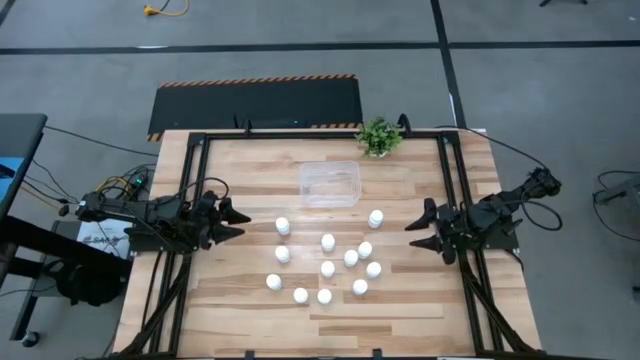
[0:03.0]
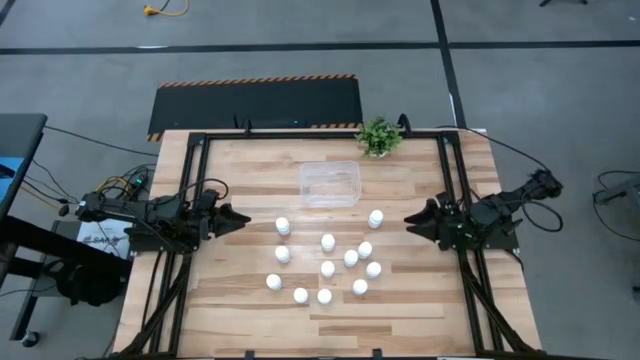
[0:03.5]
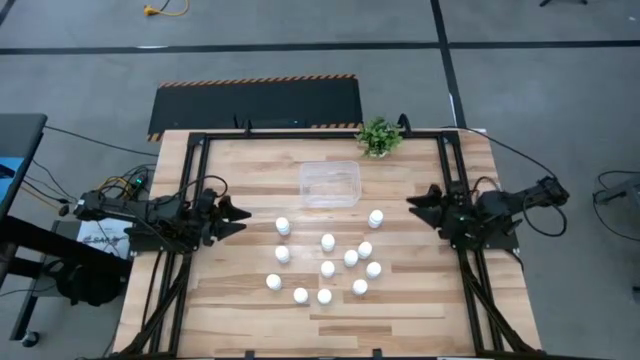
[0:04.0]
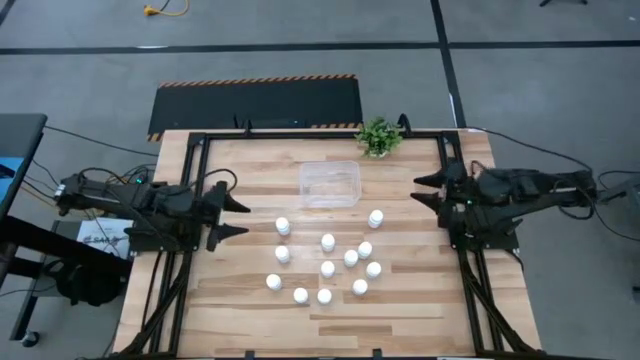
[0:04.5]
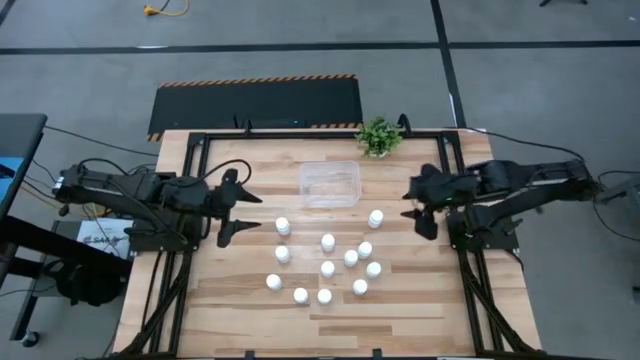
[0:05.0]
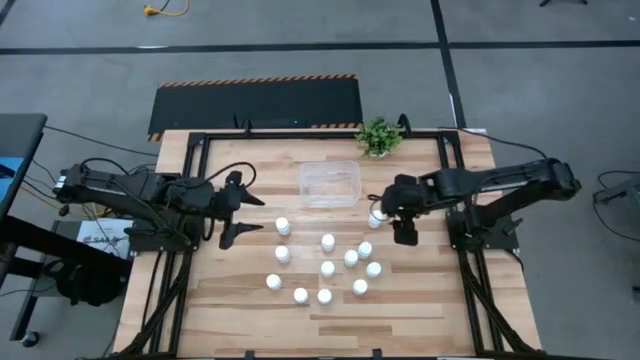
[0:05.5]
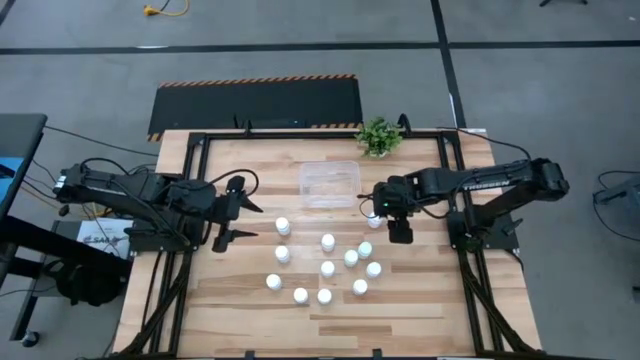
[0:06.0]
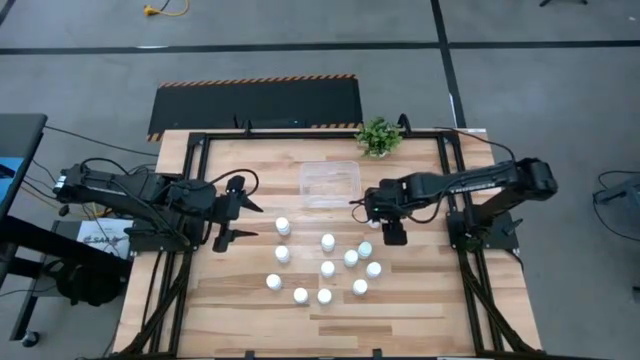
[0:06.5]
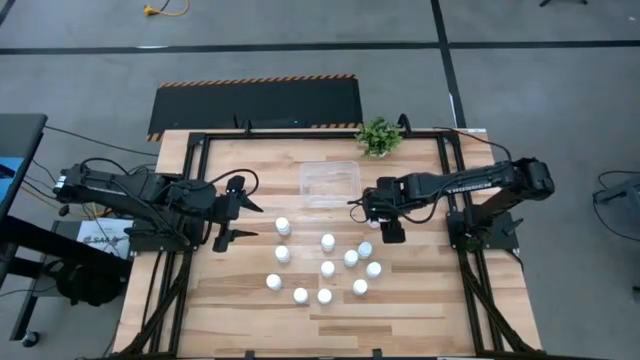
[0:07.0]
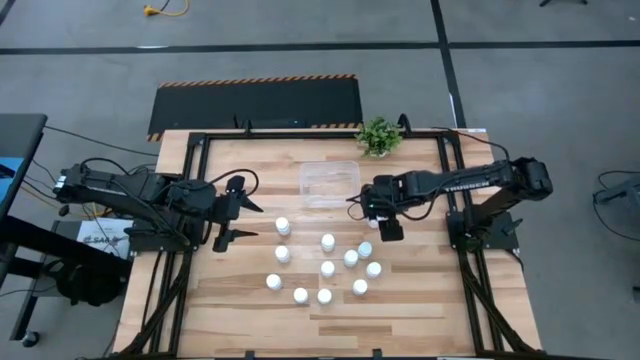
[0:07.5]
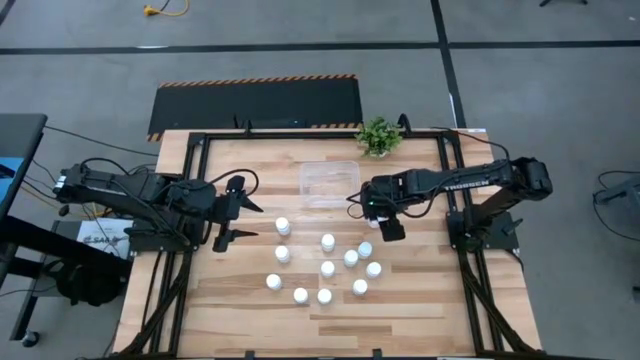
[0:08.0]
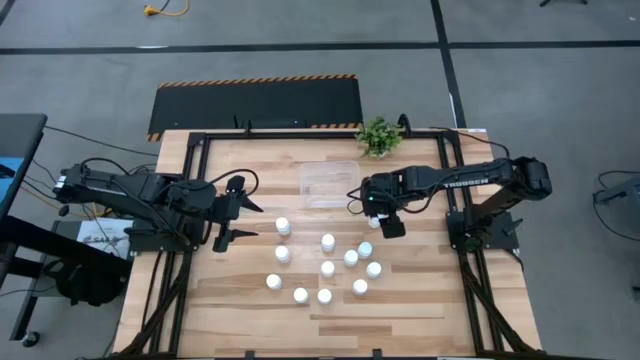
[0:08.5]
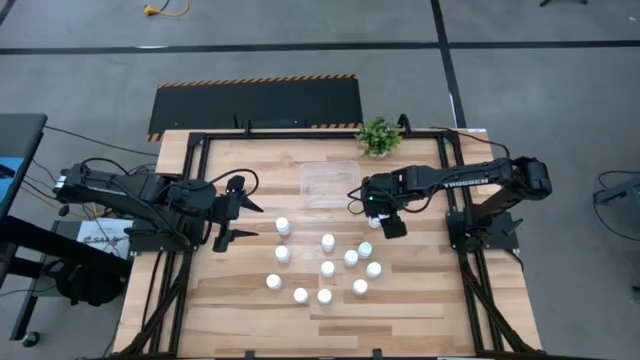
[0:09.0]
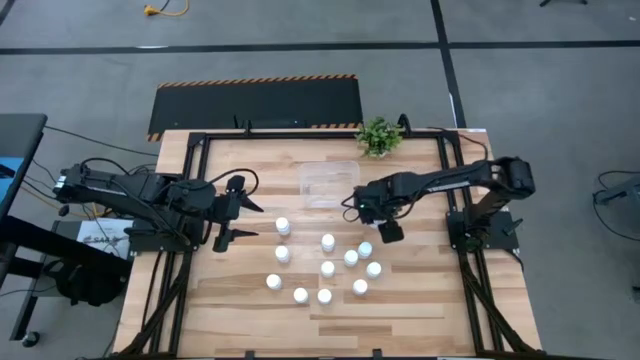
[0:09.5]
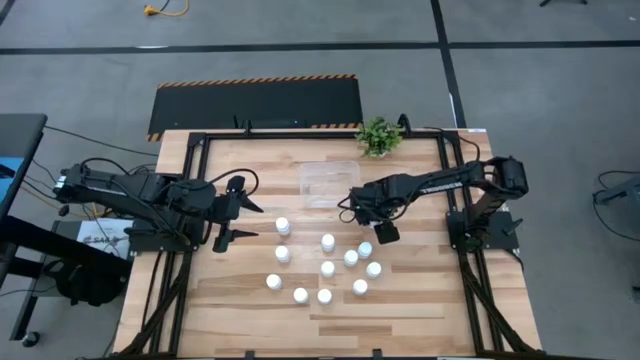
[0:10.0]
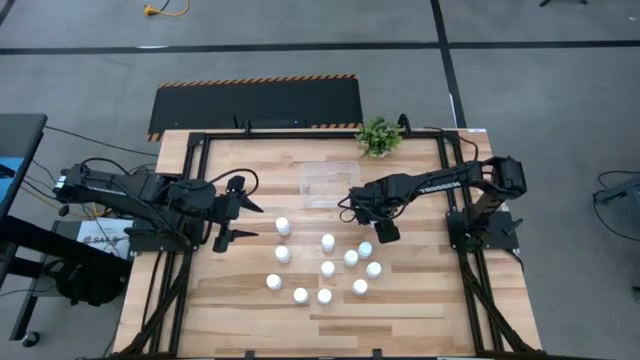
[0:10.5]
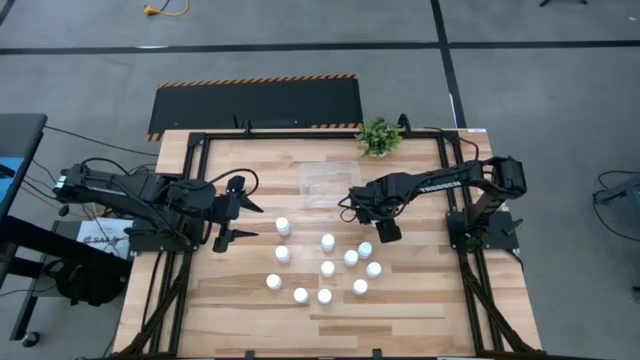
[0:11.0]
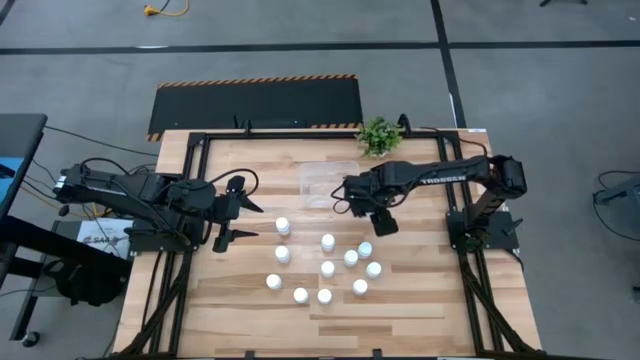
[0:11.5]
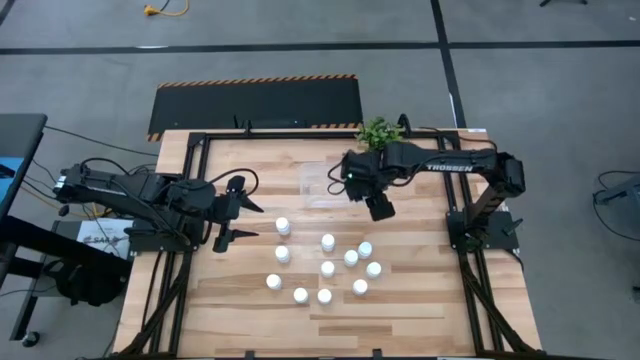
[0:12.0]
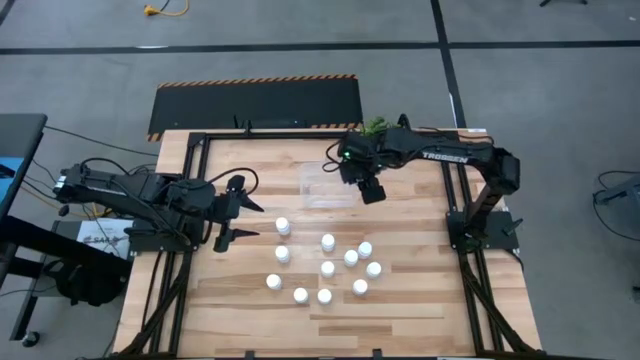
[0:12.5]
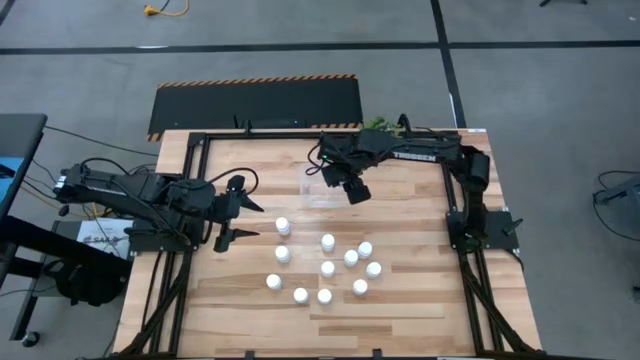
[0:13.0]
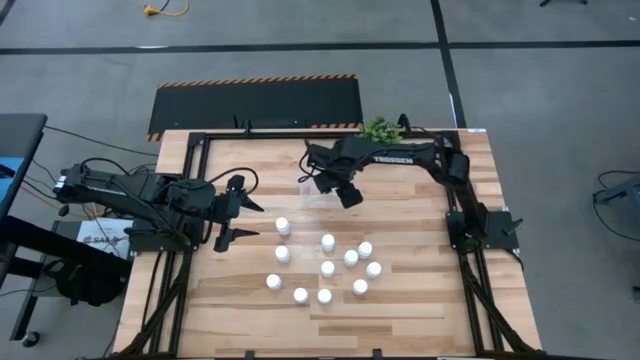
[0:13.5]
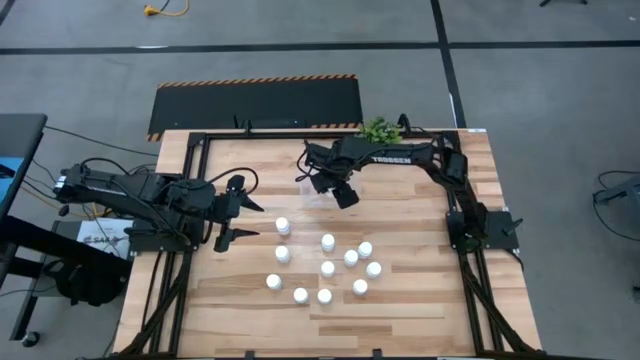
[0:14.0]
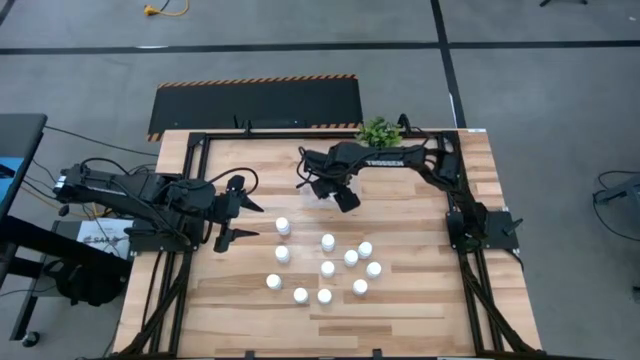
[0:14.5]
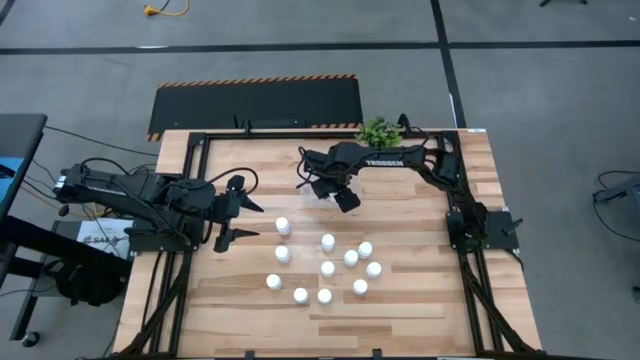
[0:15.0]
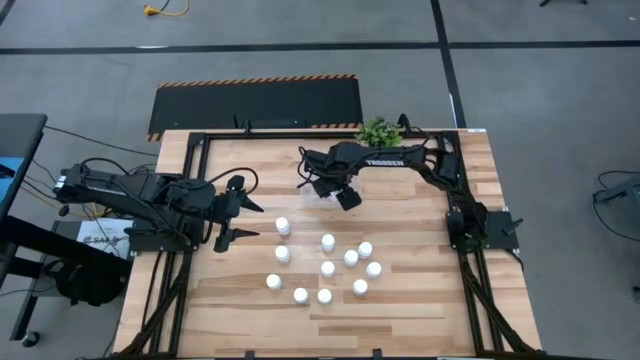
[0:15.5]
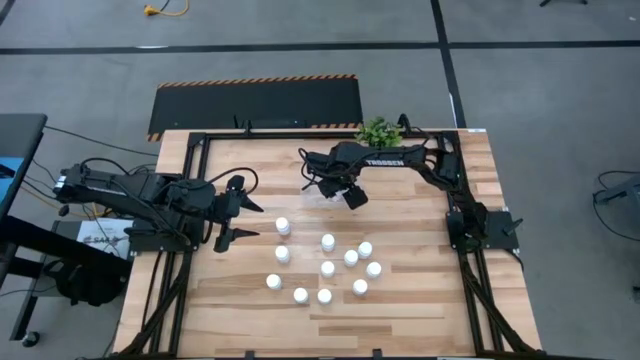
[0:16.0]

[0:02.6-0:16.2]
Task: Pick and place pill bottles into a basket
Put the white medicine bottle into the transparent bin

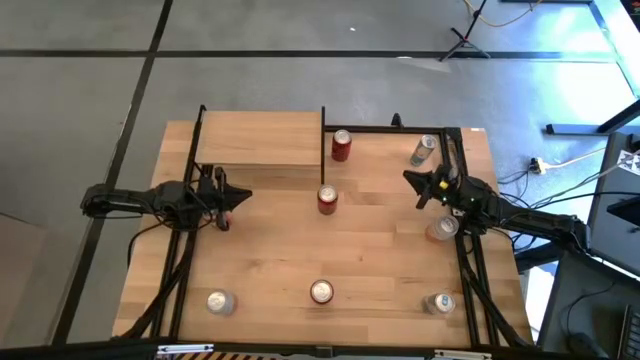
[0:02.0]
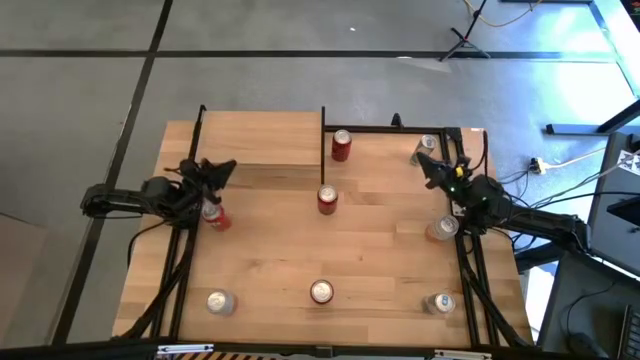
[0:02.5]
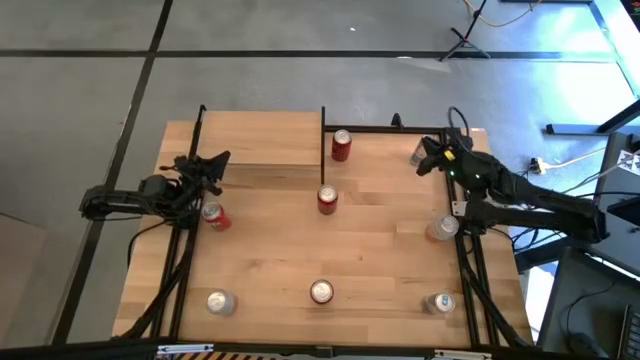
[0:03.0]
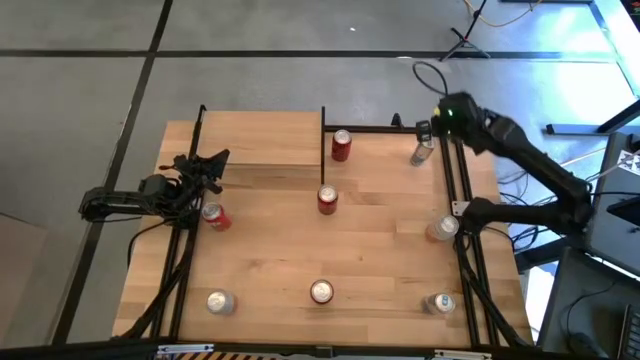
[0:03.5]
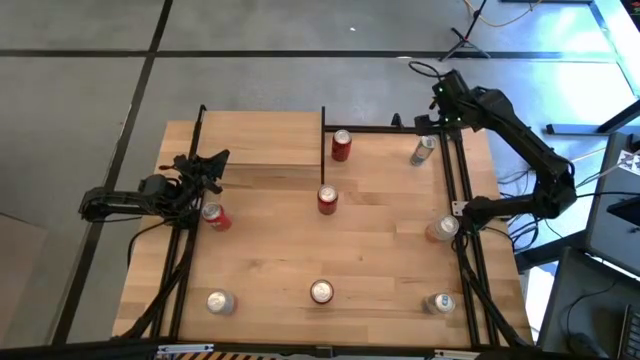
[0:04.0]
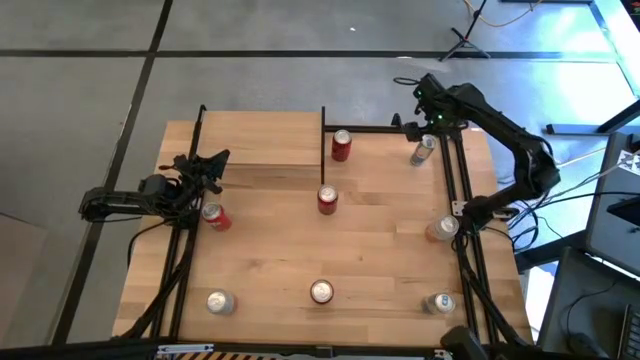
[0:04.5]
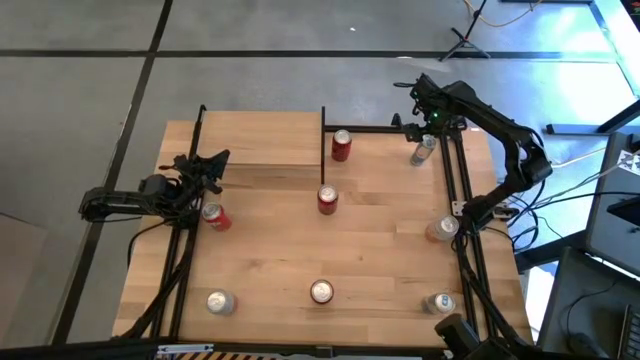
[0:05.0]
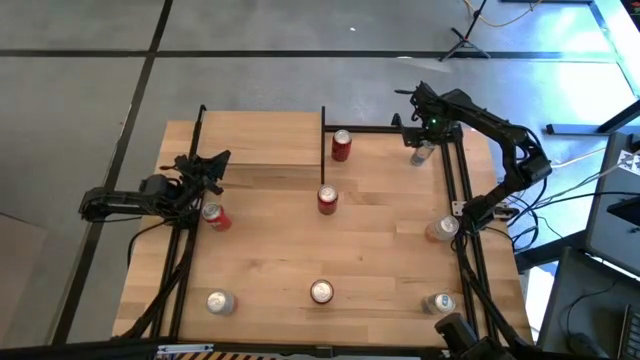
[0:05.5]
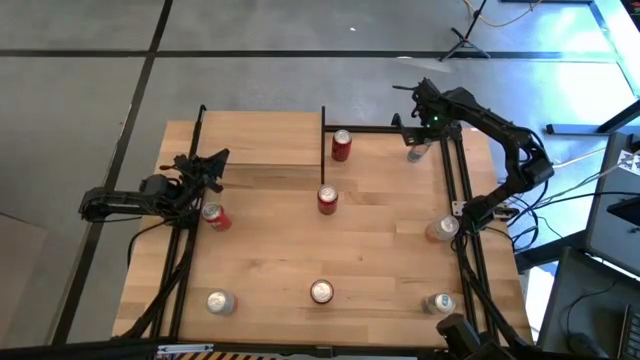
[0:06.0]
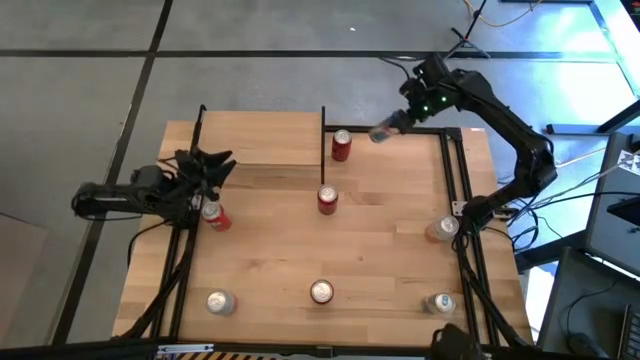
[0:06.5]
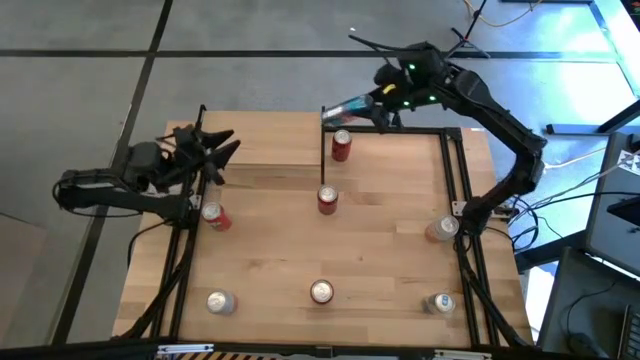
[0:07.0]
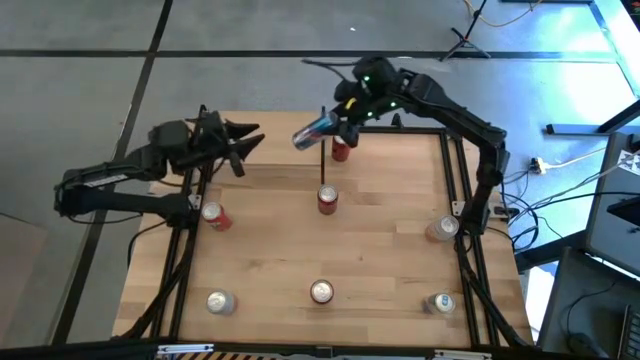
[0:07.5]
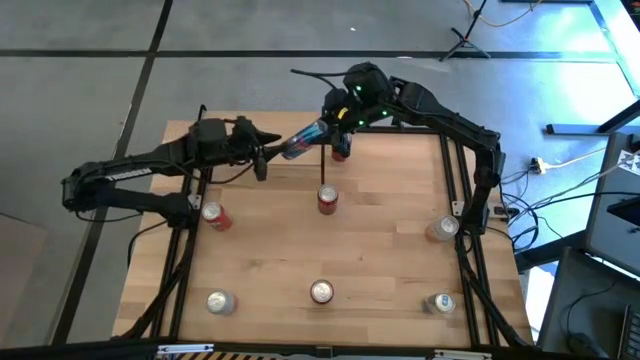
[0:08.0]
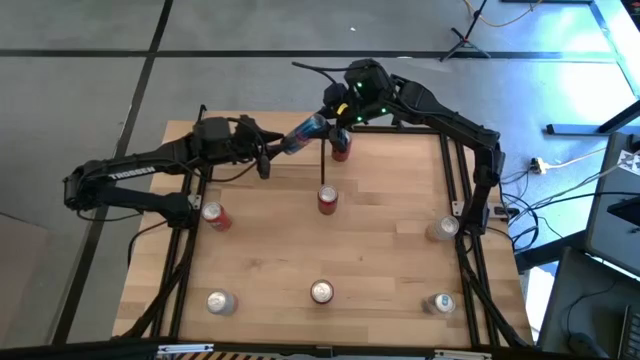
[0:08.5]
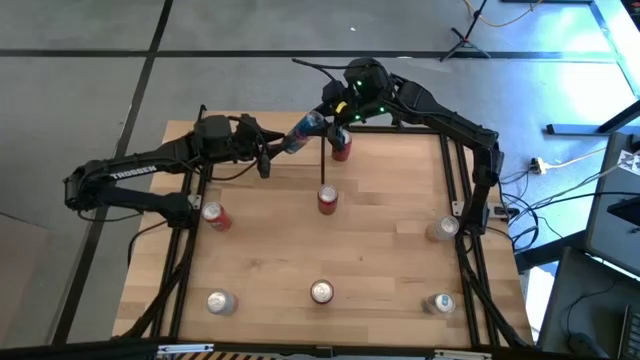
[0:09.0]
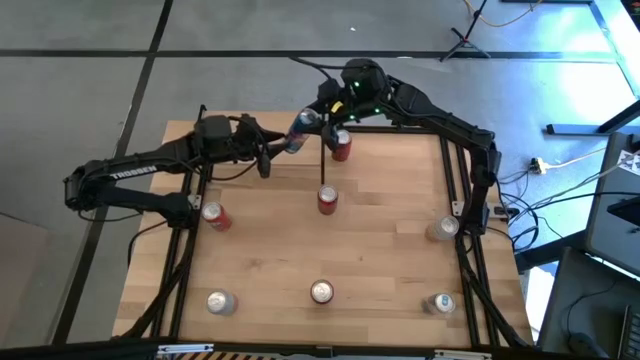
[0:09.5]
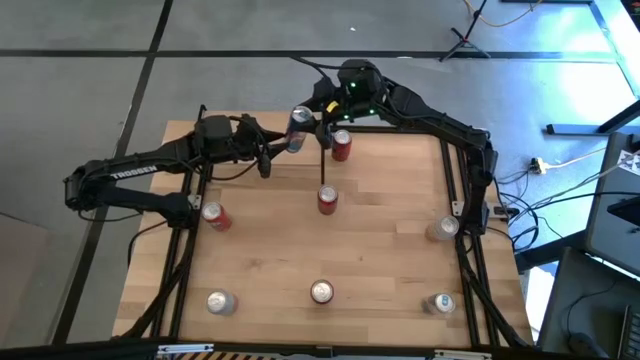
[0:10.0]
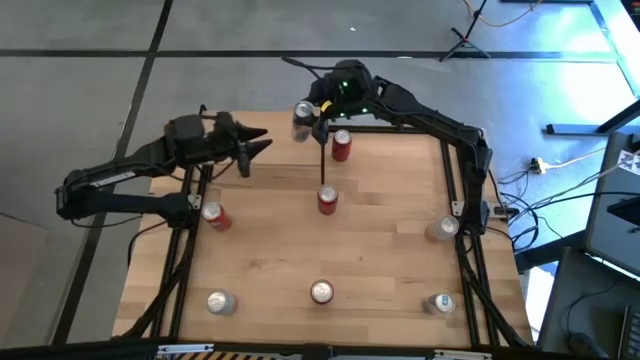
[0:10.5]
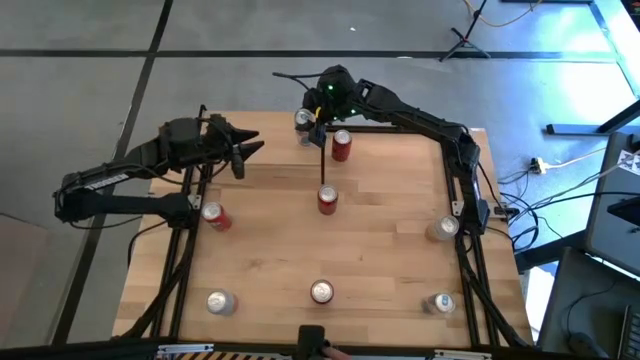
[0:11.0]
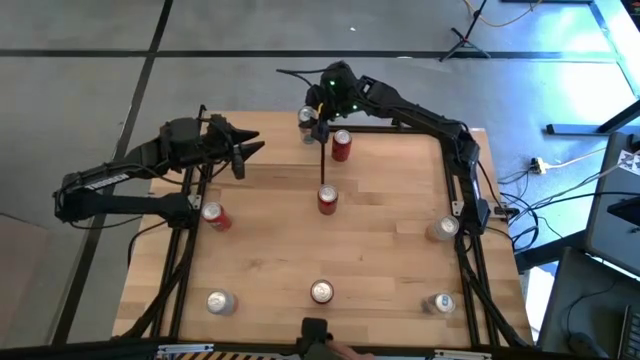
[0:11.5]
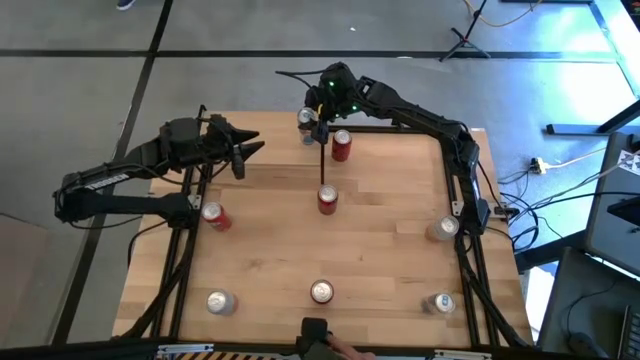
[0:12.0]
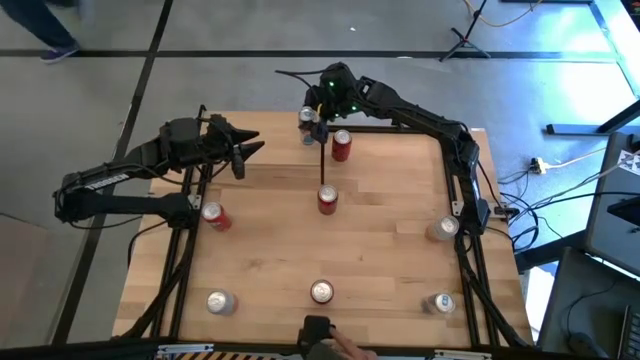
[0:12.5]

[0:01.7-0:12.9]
Task: Place canned beverage on shelf
Put the top blue soda can on the shelf
